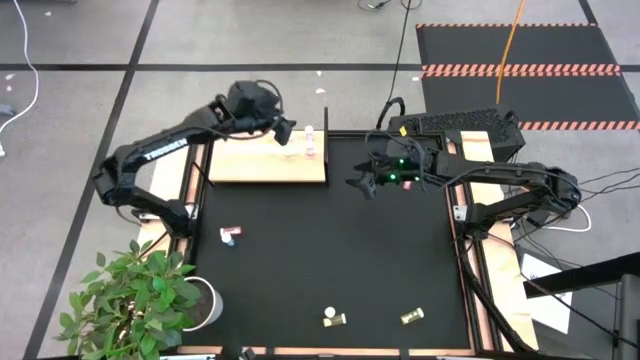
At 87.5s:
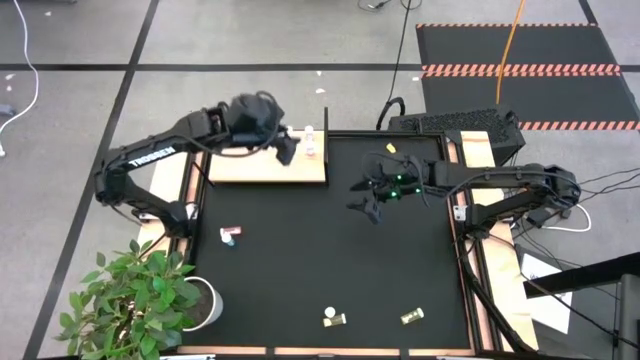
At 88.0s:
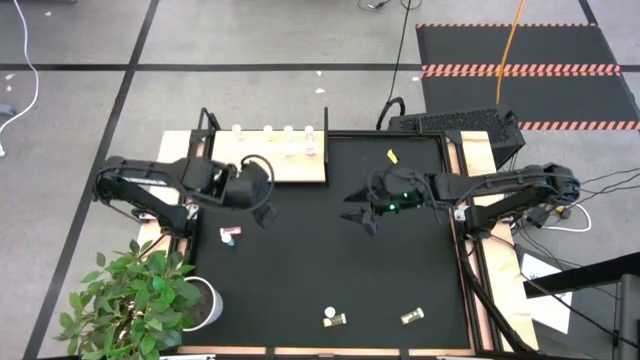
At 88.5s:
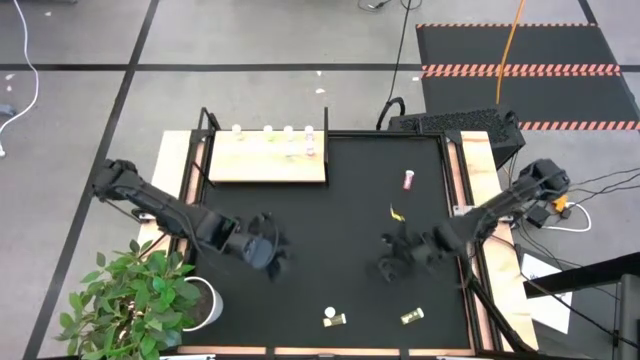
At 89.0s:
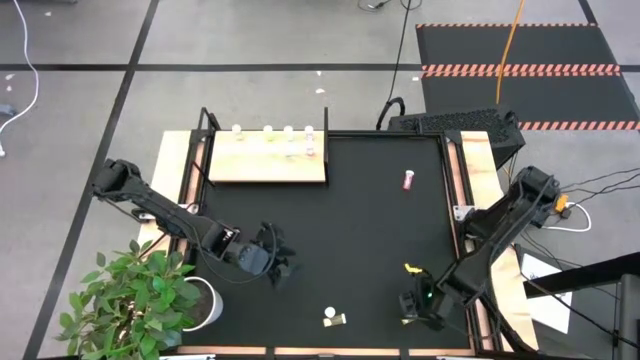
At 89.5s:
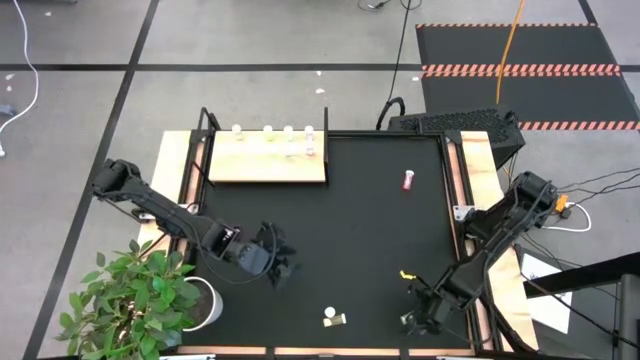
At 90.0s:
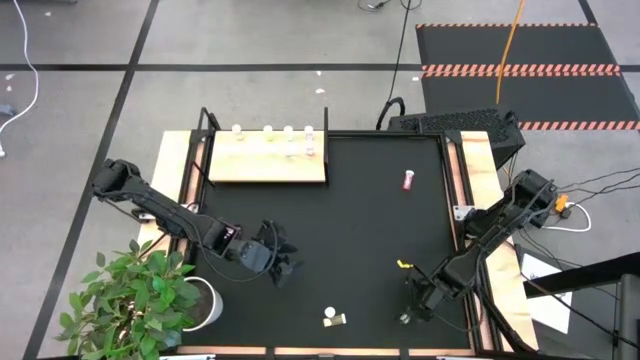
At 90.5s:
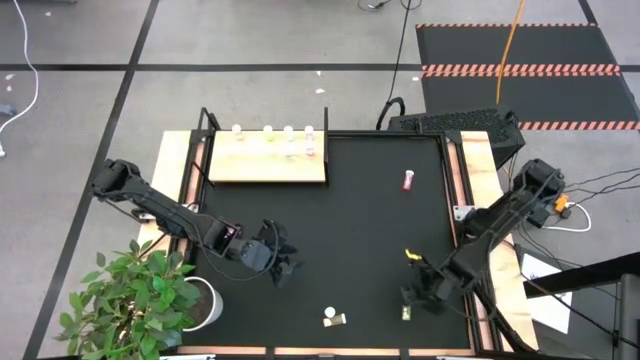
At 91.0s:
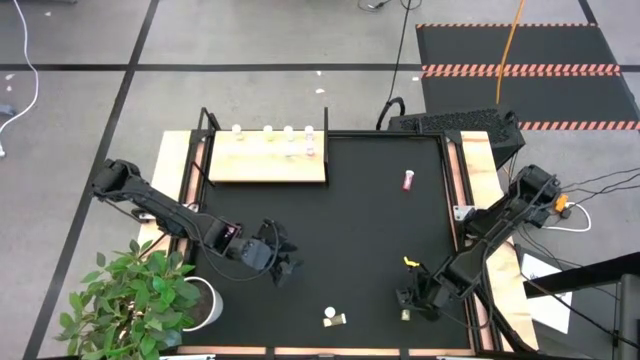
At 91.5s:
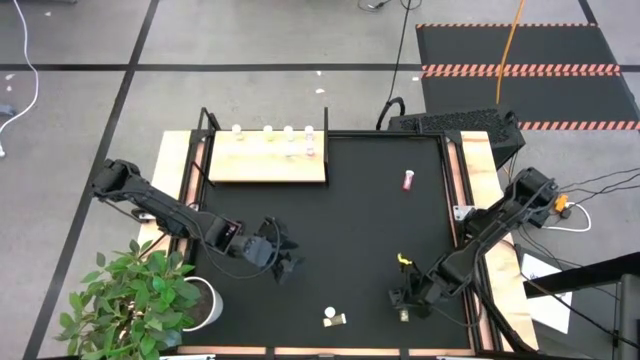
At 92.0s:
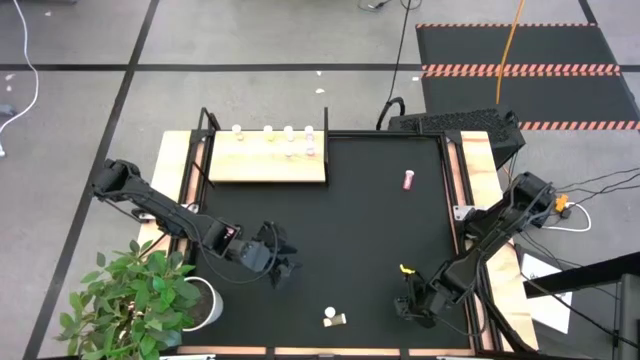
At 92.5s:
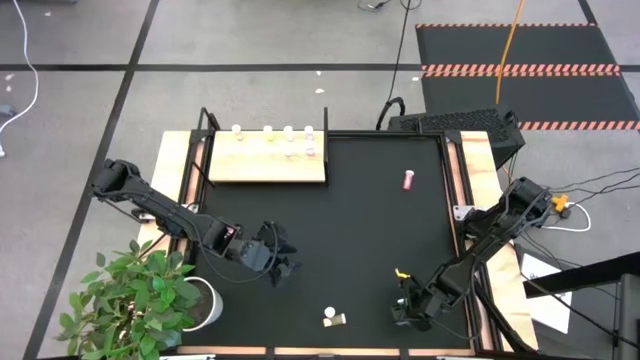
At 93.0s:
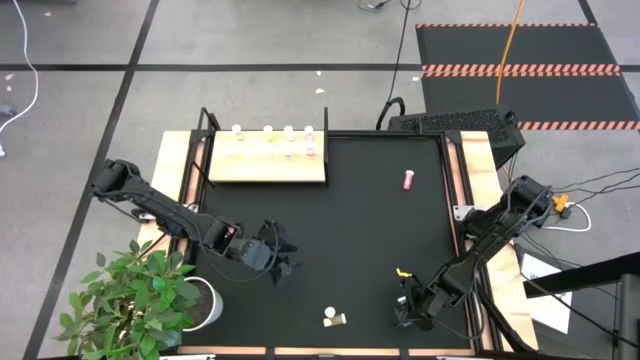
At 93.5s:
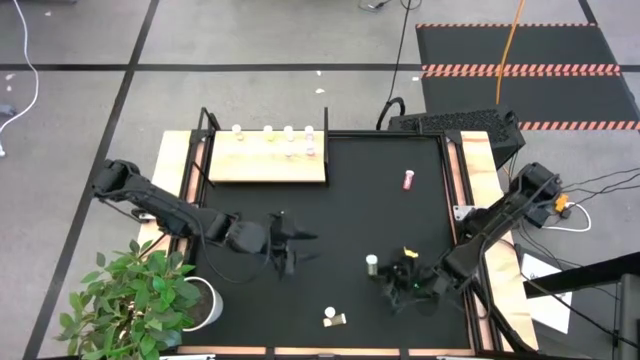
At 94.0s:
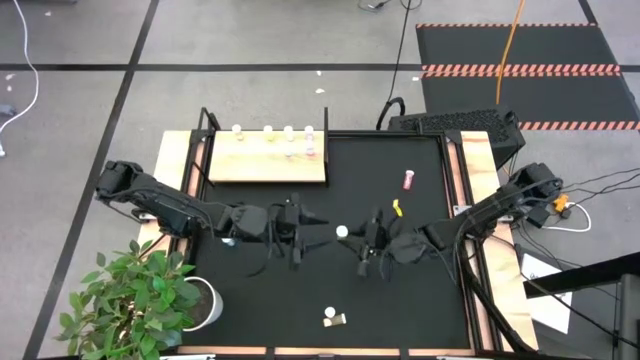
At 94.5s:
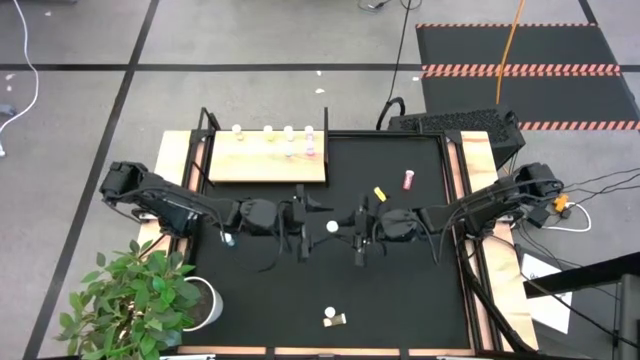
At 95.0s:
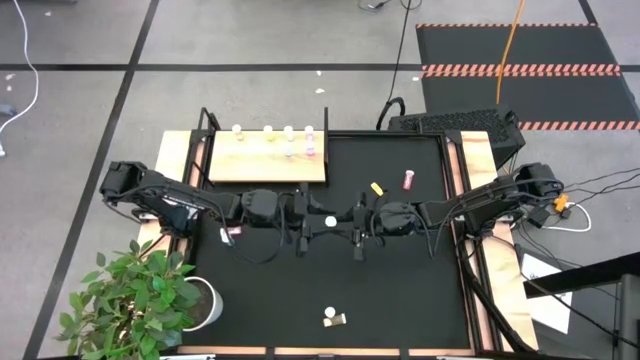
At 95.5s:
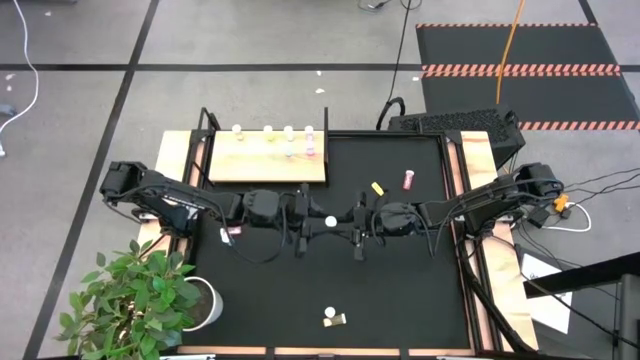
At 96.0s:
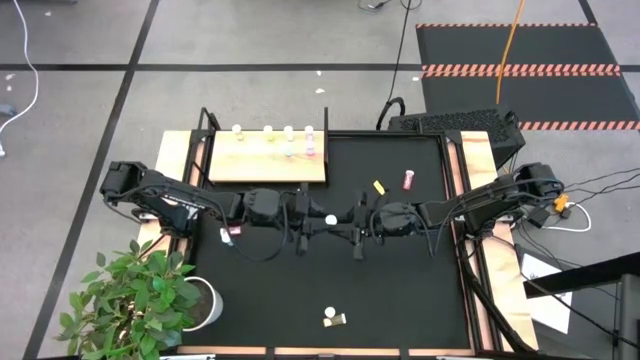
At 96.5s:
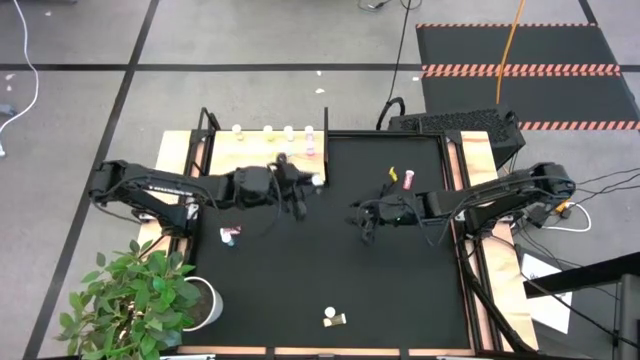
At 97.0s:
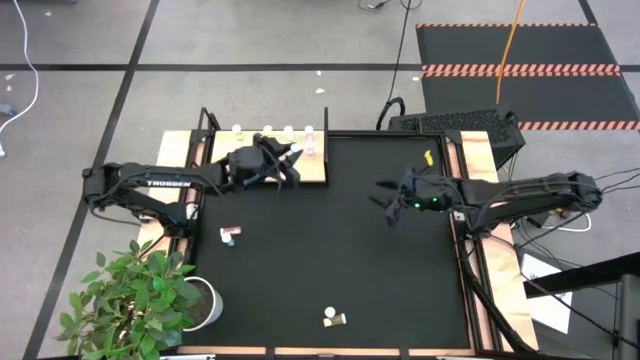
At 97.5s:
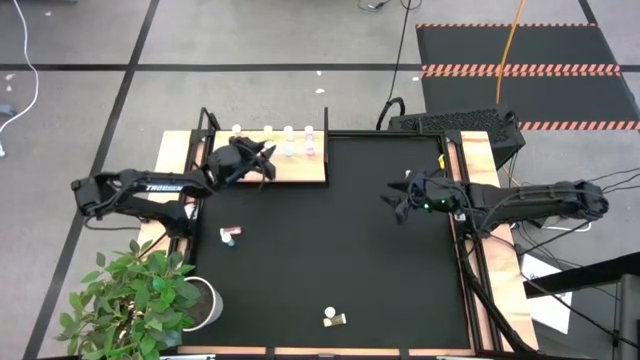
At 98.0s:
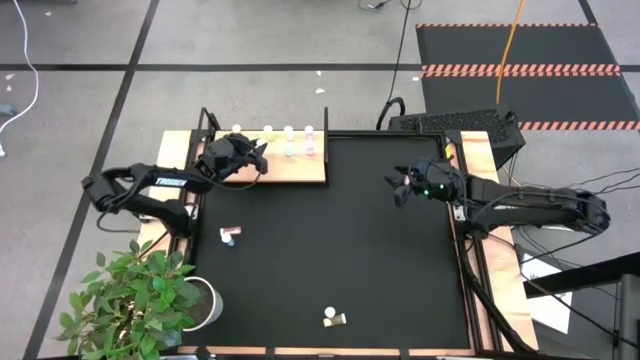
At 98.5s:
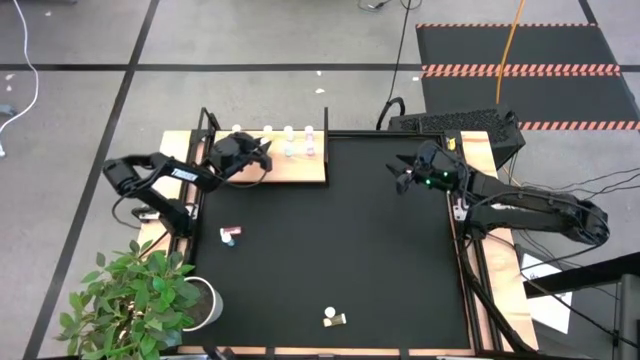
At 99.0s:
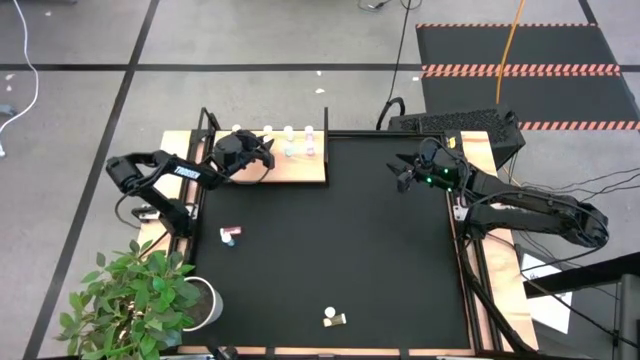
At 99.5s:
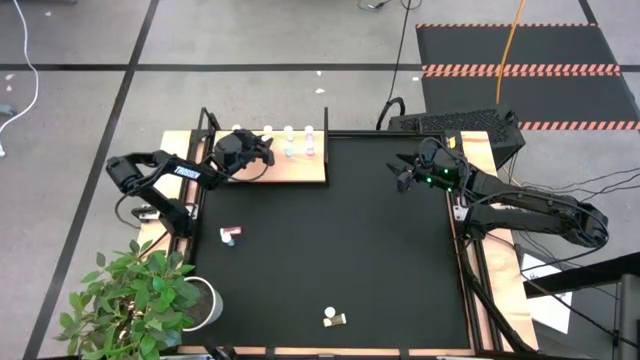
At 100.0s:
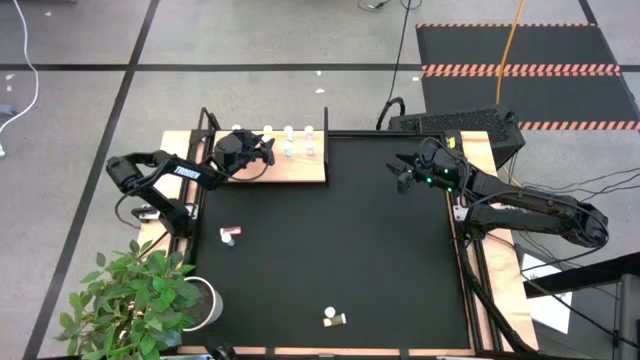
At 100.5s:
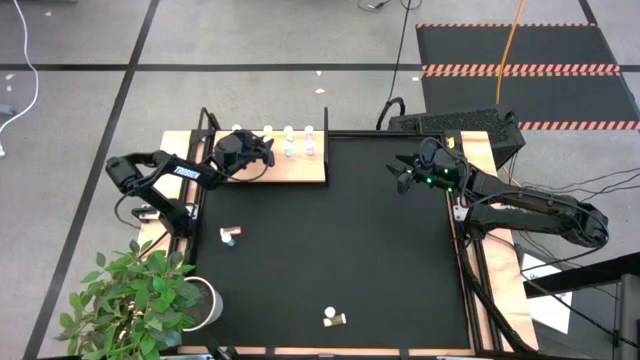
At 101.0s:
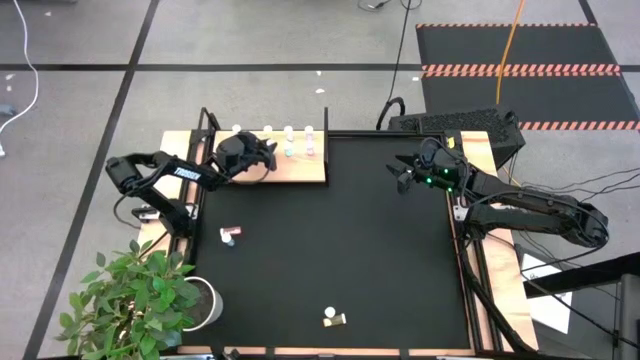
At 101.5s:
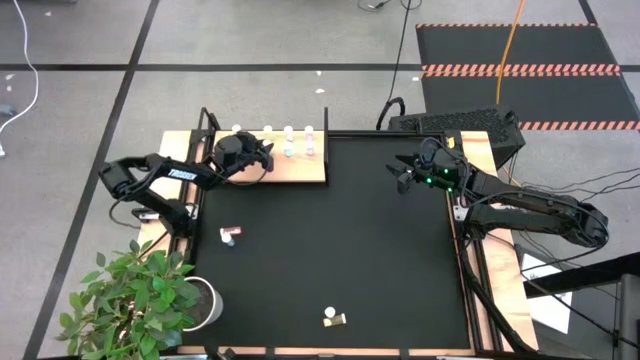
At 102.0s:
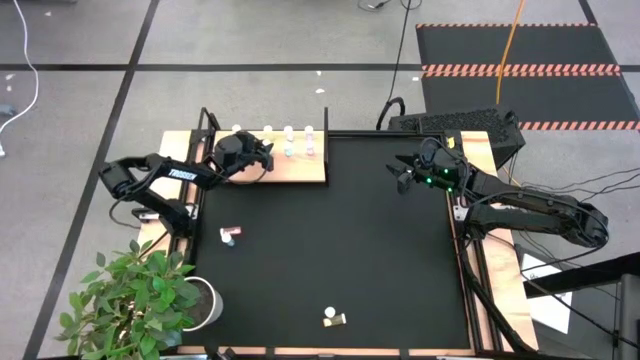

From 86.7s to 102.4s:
Task: Pick and place medicine bottles onto shelf by color
Put the right yellow pill bottle on the shelf aligned with the other yellow pill bottle

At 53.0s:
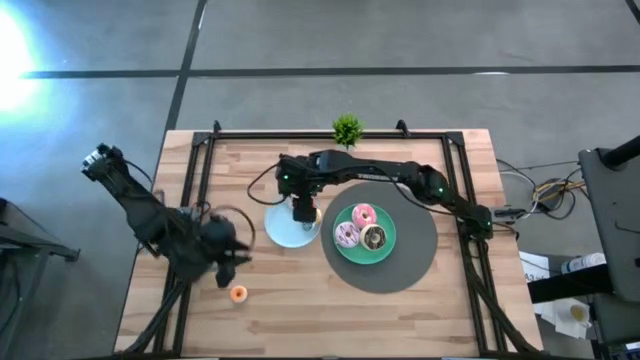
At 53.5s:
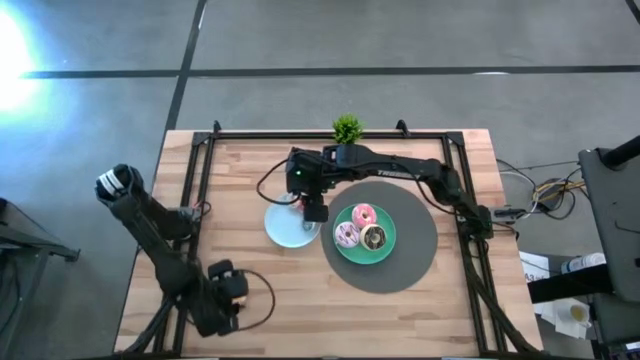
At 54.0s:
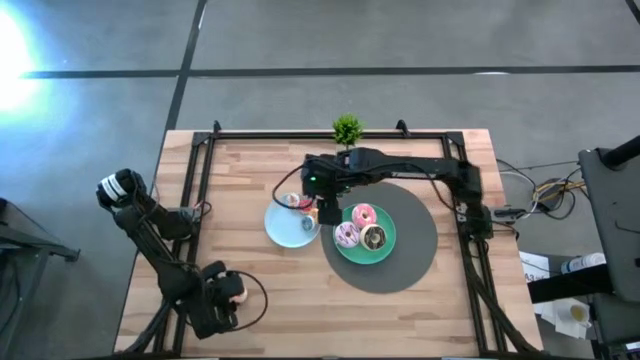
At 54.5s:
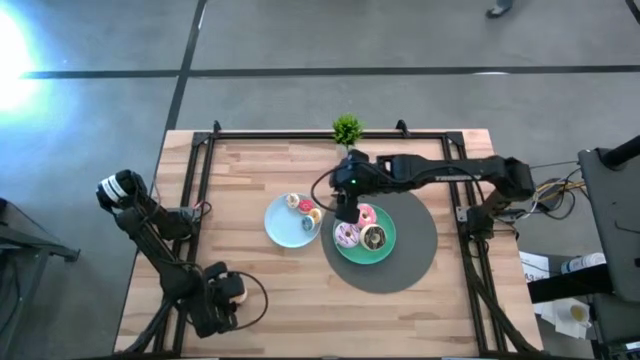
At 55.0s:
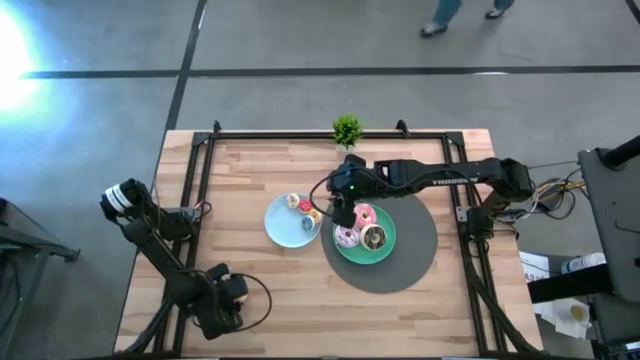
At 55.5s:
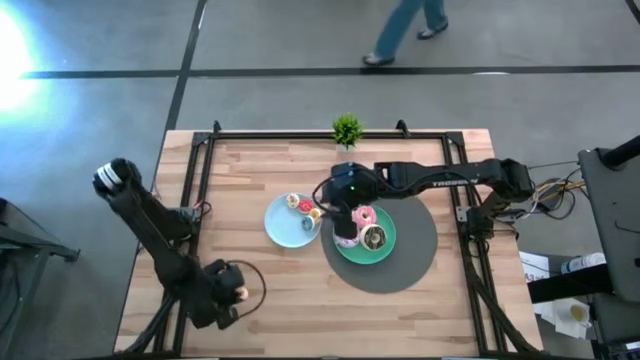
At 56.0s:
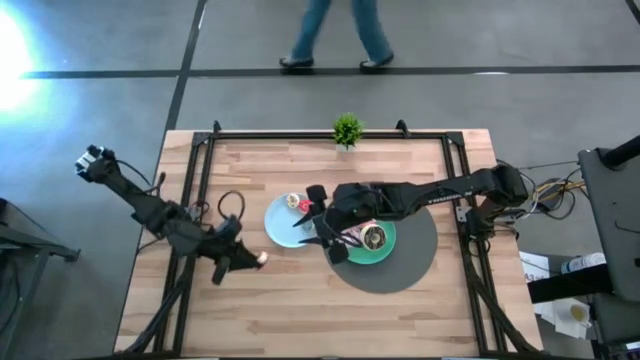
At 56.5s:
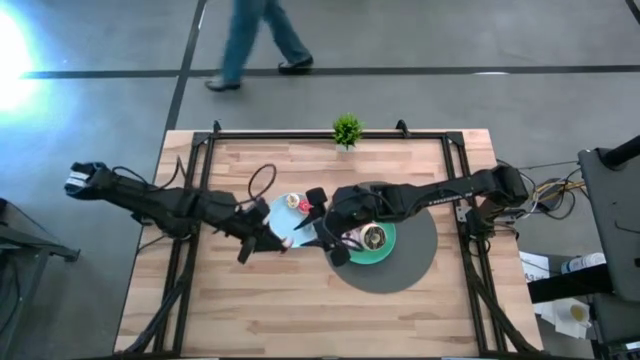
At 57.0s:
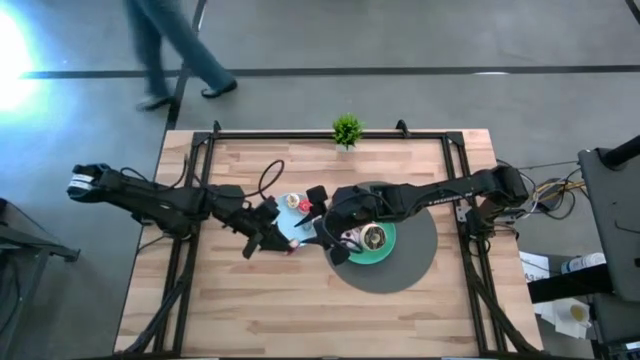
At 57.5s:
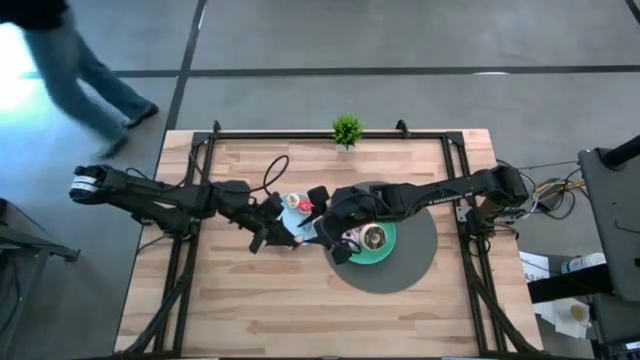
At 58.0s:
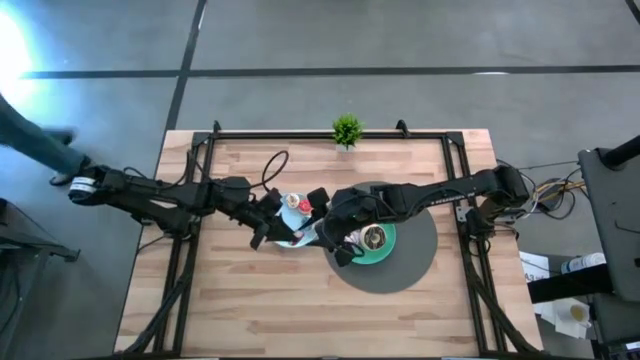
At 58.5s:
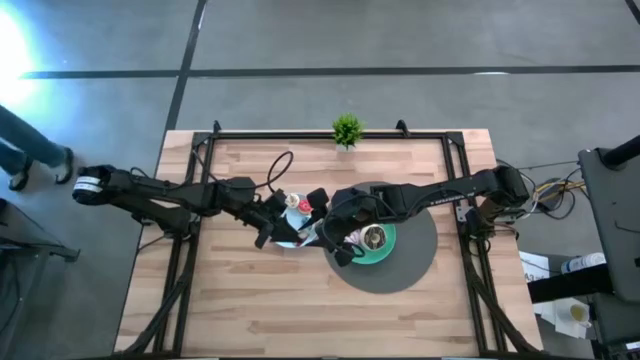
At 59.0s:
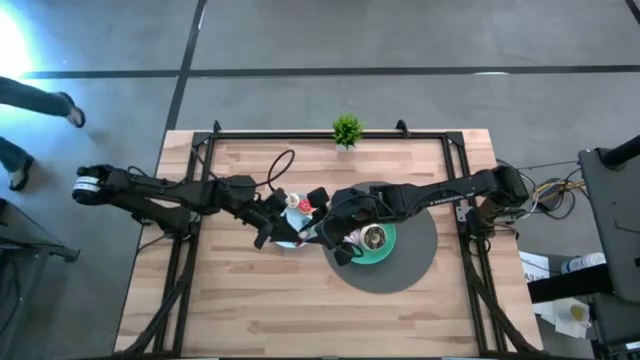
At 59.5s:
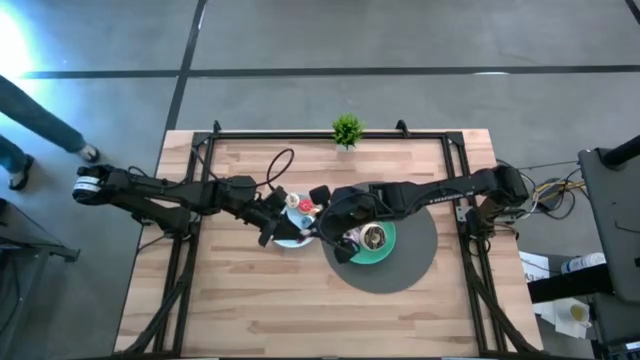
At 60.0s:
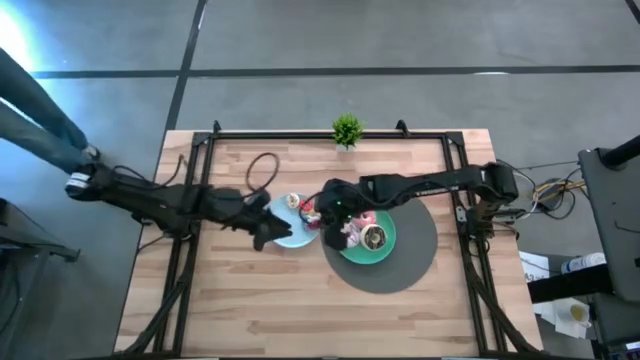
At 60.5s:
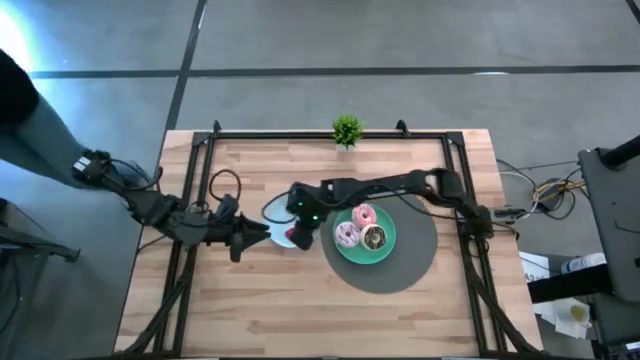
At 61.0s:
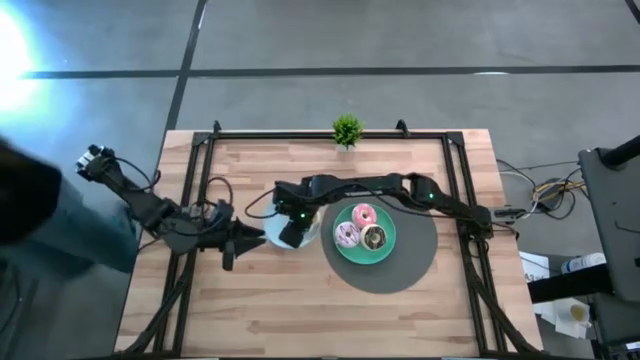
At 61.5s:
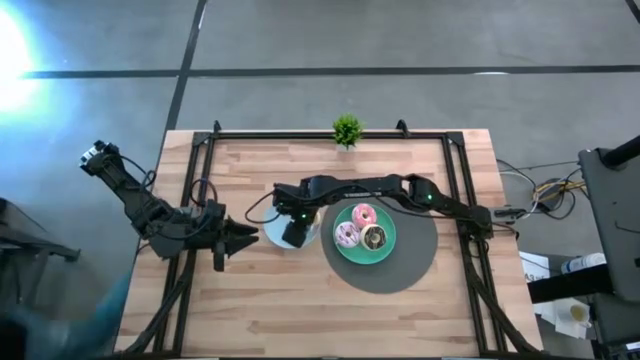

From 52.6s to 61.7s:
Task: Pick & Place donuts
Put the small red donut on the light blue plate
